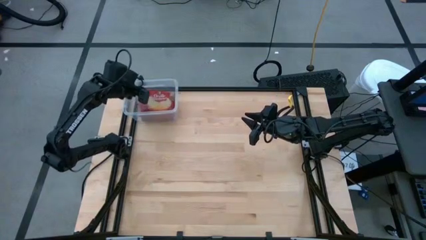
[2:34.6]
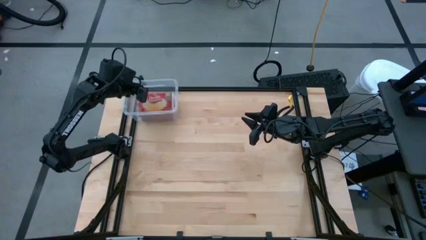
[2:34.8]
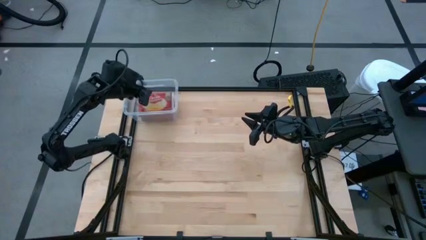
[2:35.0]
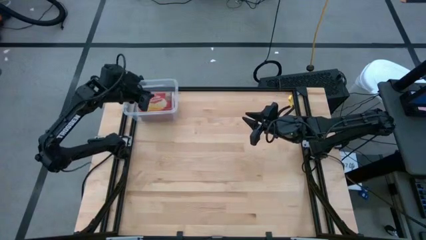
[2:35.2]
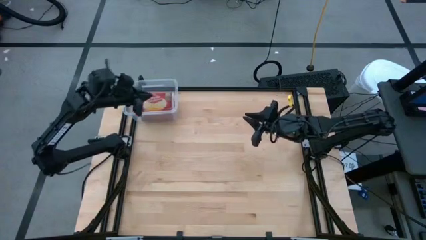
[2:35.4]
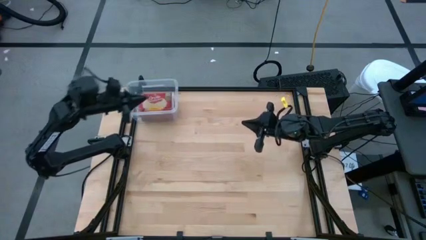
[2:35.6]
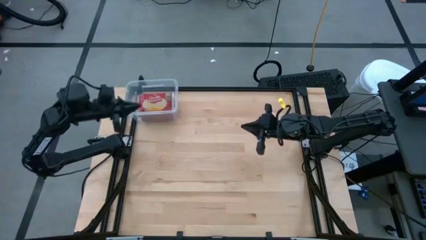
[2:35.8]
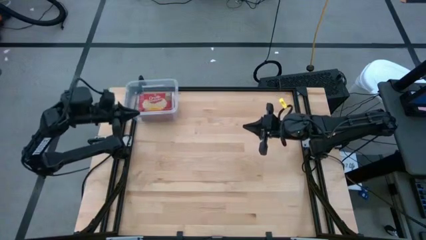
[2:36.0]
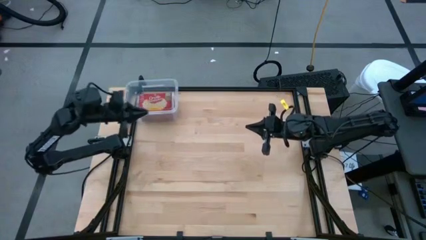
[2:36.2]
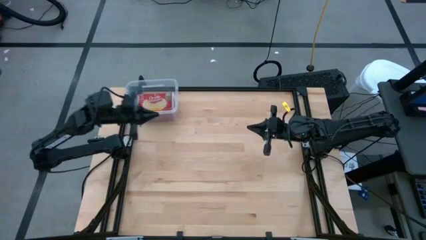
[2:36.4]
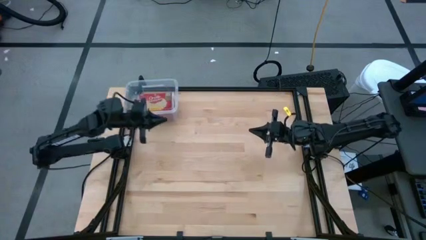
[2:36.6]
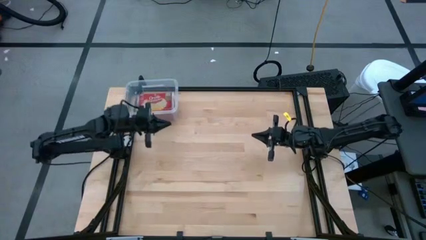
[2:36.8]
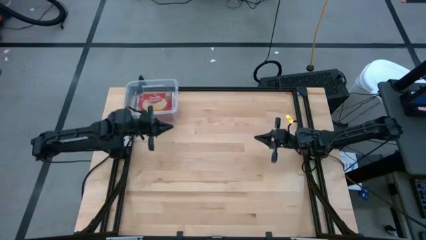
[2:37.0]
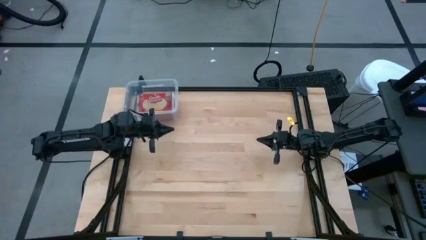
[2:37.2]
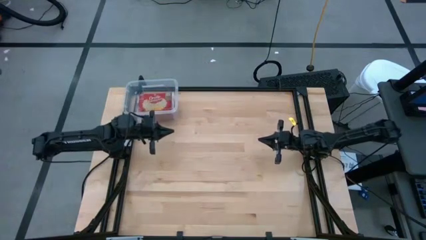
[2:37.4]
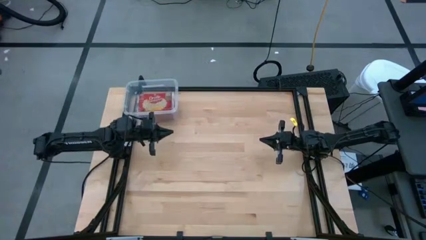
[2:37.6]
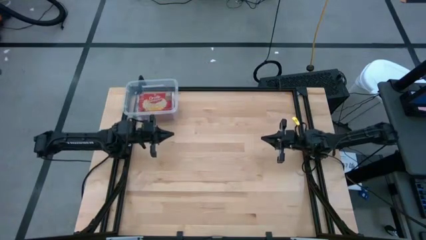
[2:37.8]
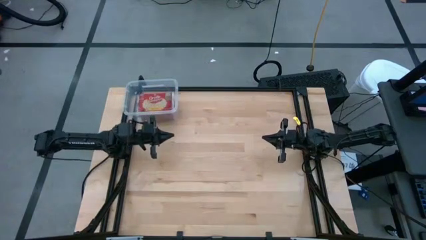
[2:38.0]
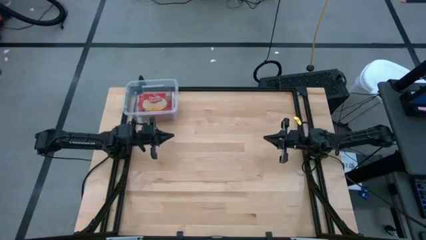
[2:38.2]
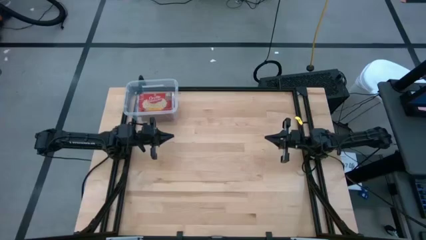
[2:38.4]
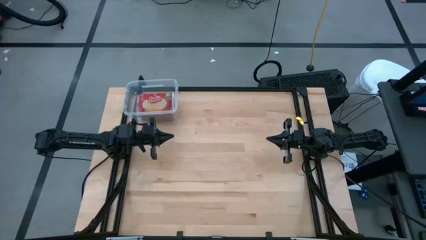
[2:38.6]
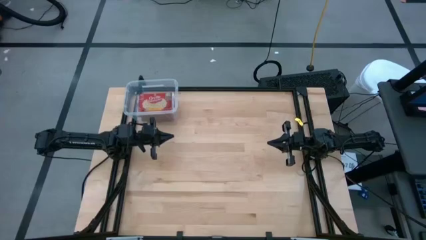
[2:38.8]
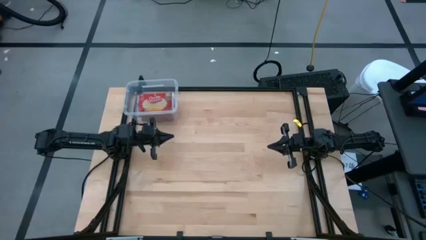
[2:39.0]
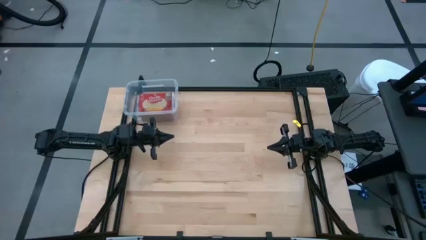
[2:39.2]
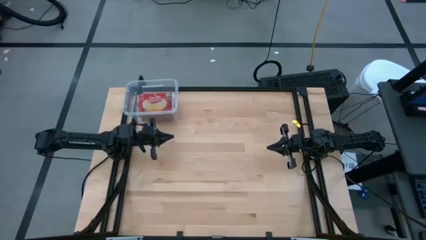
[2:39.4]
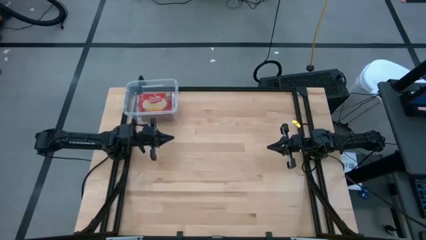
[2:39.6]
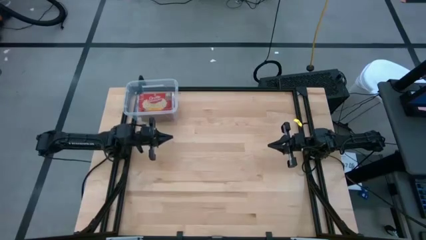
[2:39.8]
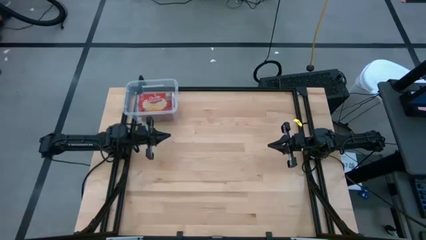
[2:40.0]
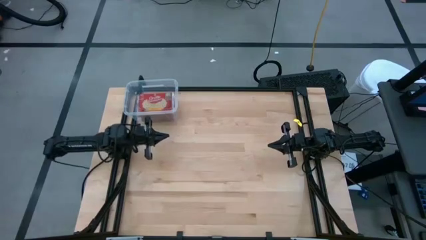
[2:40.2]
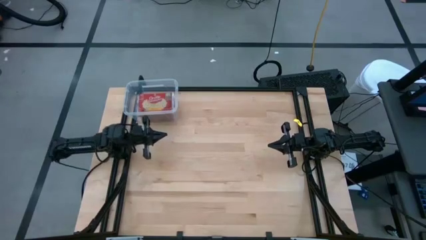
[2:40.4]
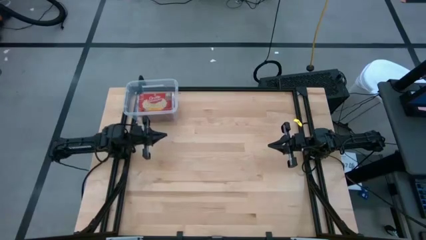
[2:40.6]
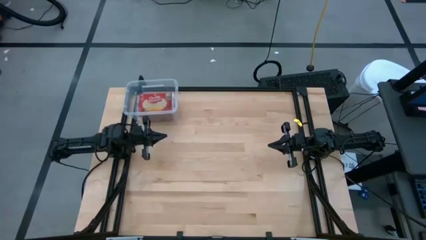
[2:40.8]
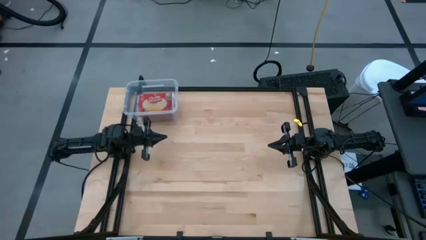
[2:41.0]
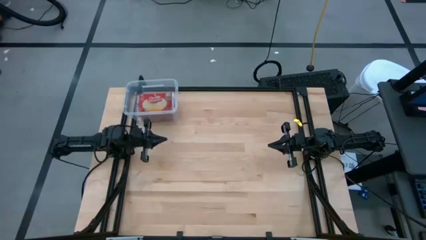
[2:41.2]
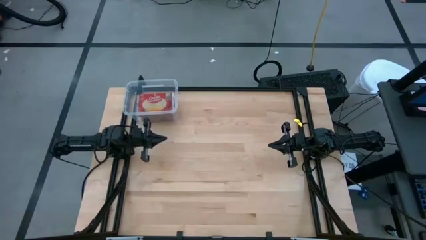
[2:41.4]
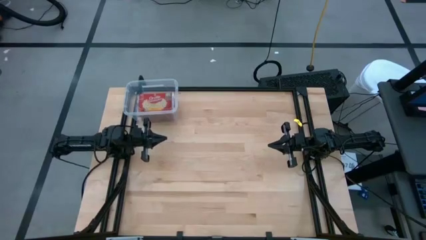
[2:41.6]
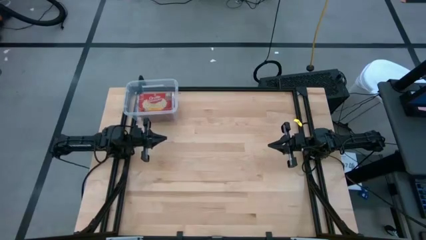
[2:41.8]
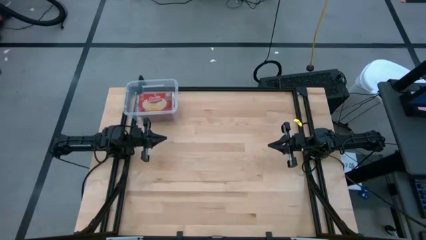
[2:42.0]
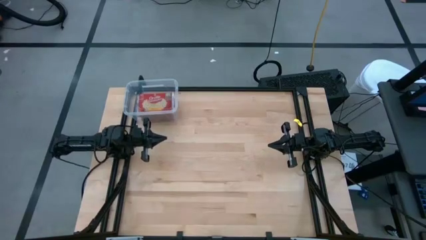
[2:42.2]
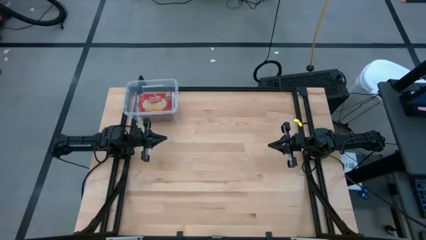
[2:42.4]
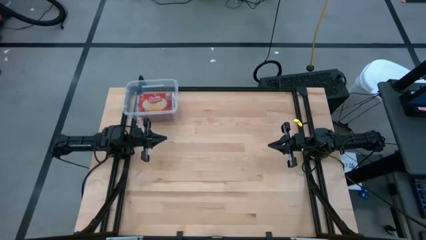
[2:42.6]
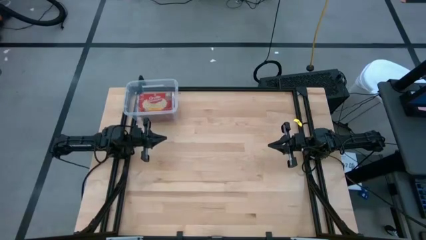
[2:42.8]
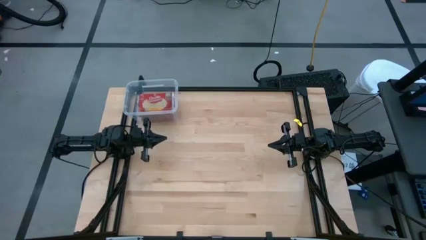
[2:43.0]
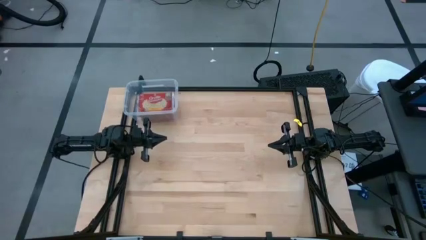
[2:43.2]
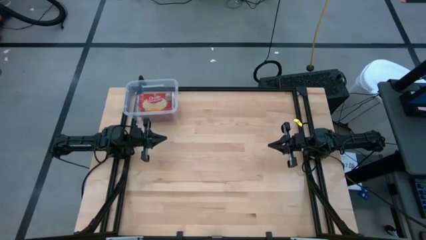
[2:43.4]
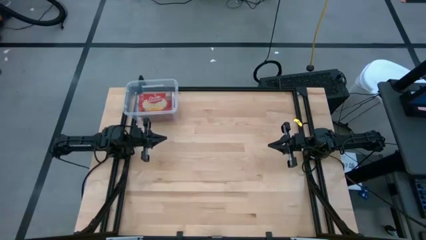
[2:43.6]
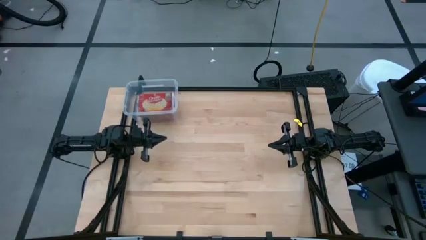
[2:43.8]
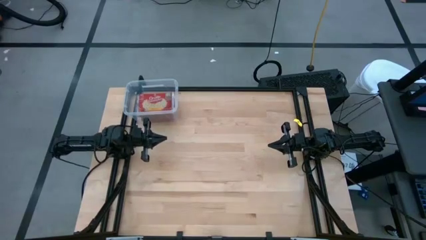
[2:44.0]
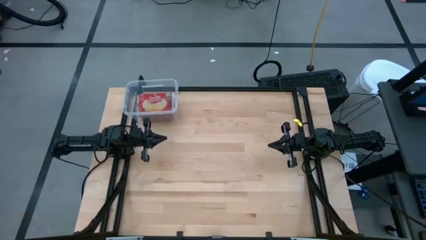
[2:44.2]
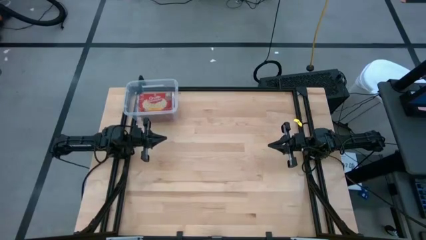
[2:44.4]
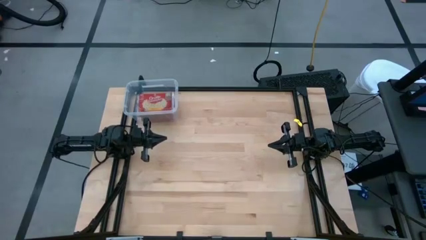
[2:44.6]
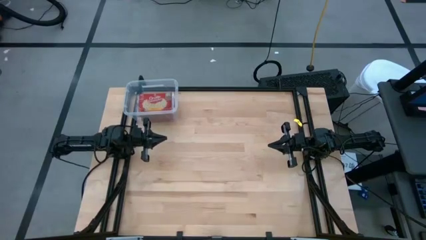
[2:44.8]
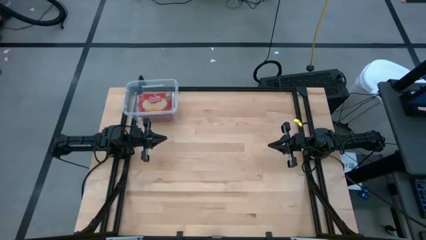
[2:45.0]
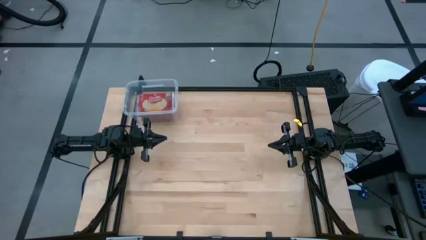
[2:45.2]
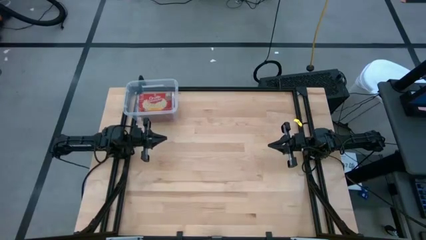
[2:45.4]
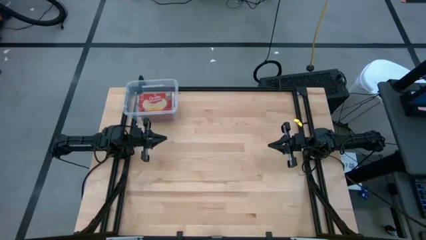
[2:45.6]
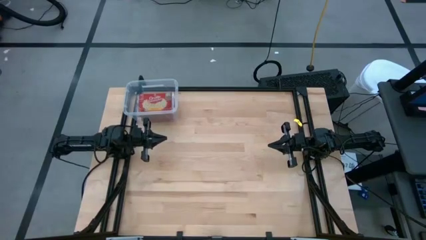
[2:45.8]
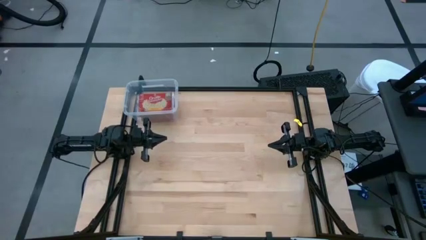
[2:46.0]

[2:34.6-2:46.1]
Task: Sort popcorn bags into baskets
Return to Home Position
